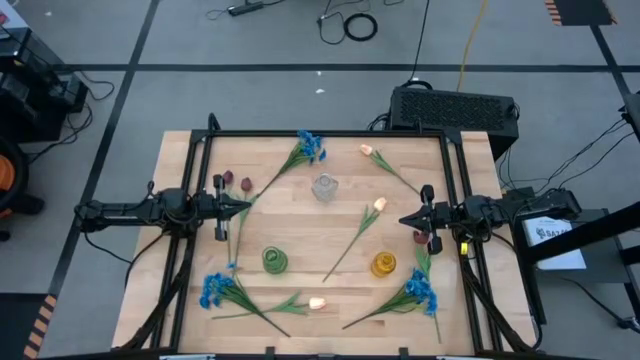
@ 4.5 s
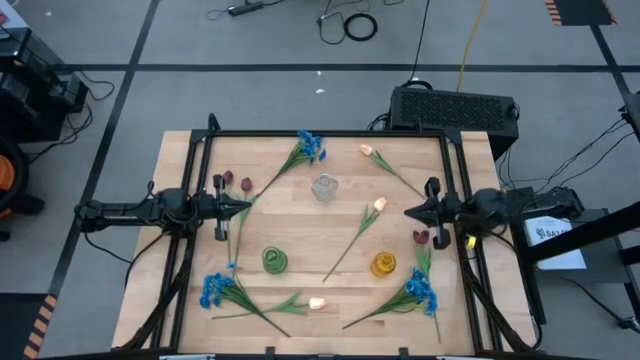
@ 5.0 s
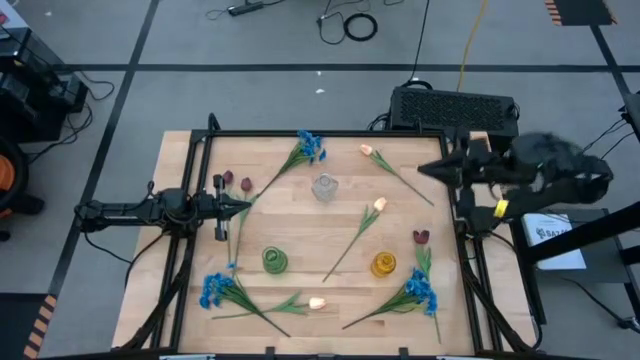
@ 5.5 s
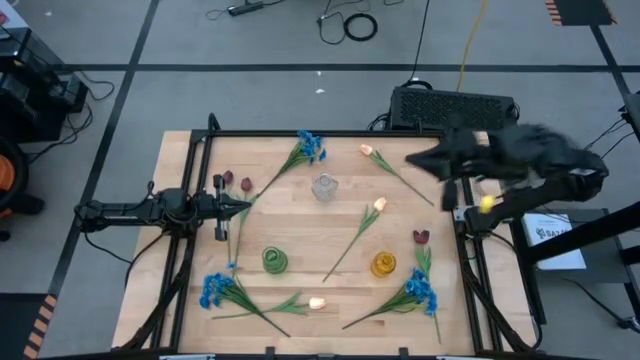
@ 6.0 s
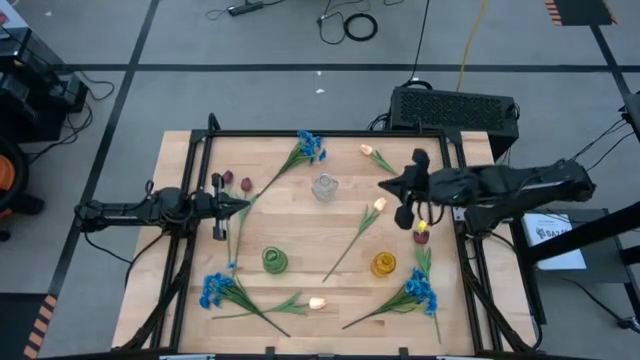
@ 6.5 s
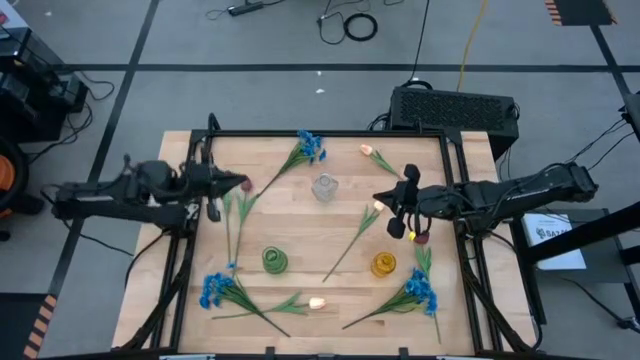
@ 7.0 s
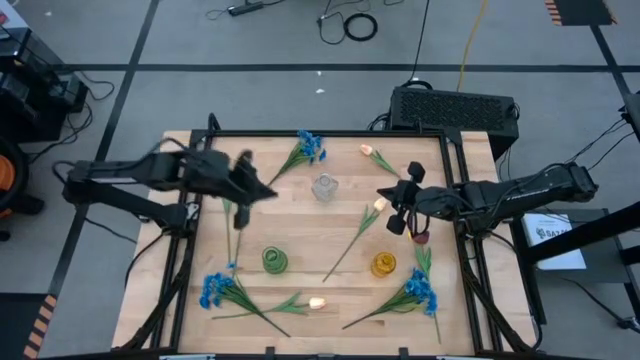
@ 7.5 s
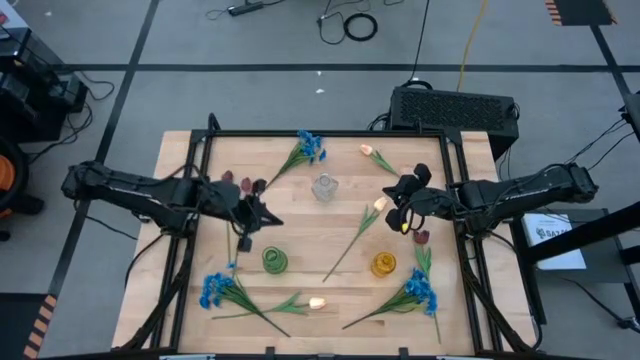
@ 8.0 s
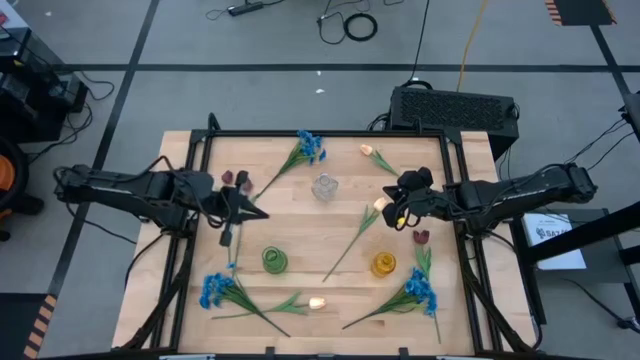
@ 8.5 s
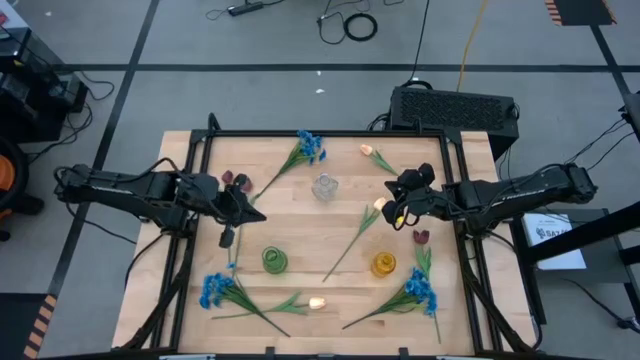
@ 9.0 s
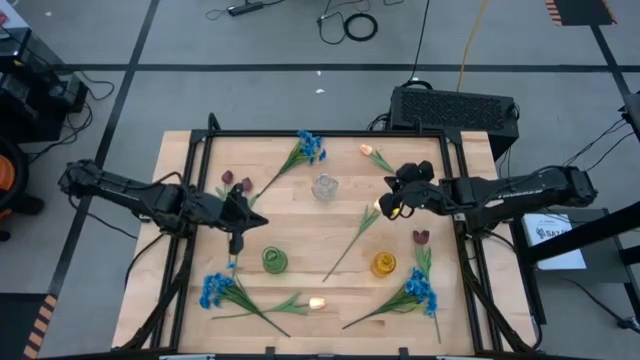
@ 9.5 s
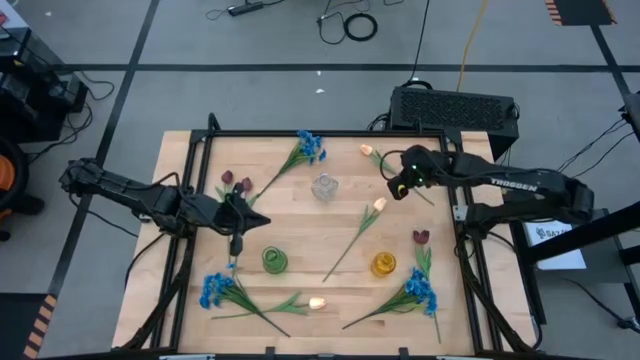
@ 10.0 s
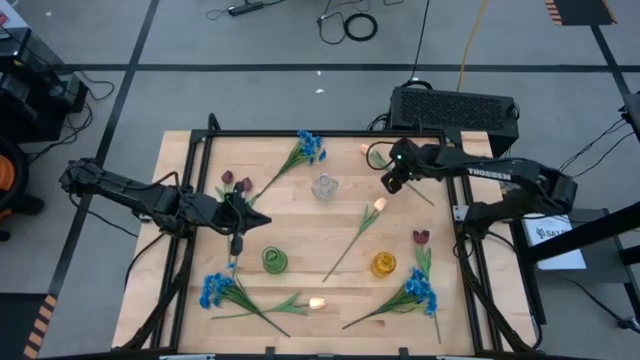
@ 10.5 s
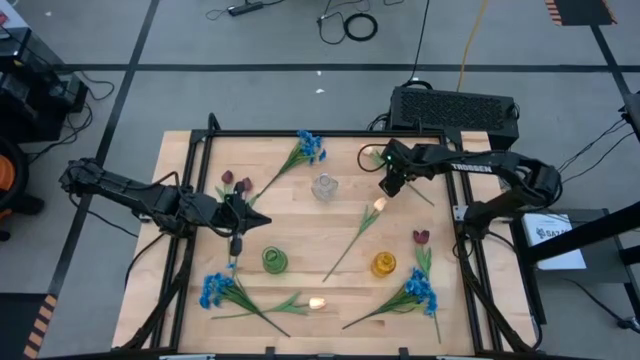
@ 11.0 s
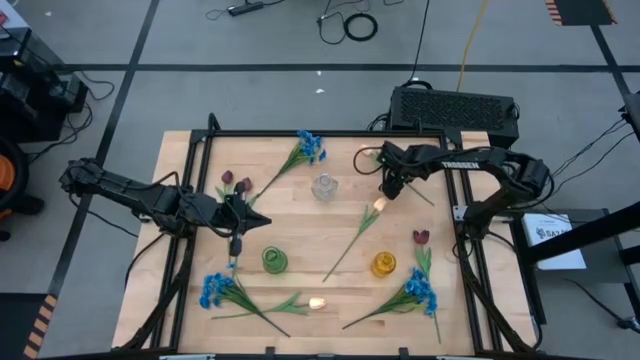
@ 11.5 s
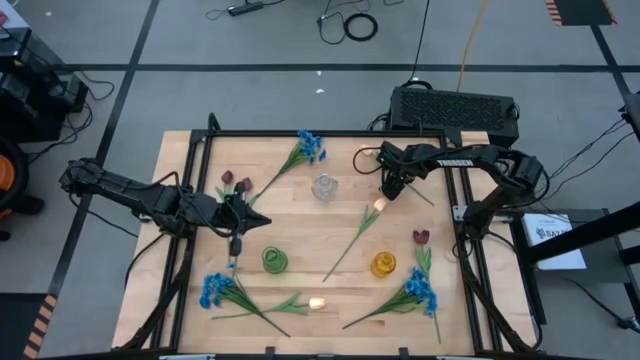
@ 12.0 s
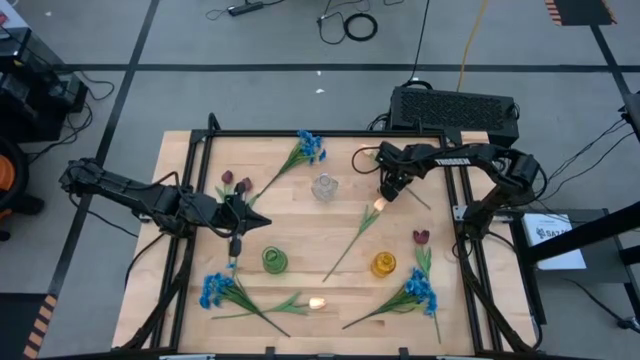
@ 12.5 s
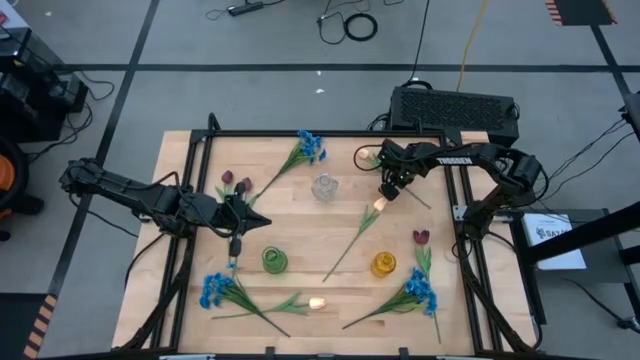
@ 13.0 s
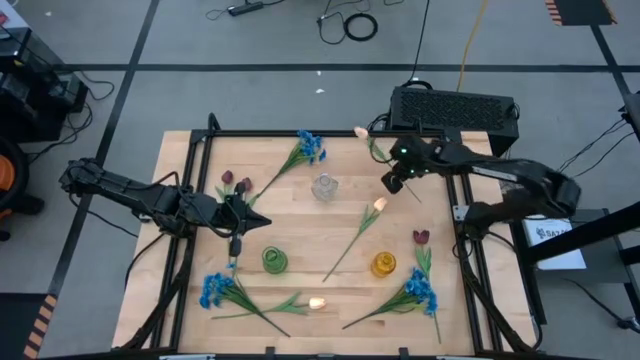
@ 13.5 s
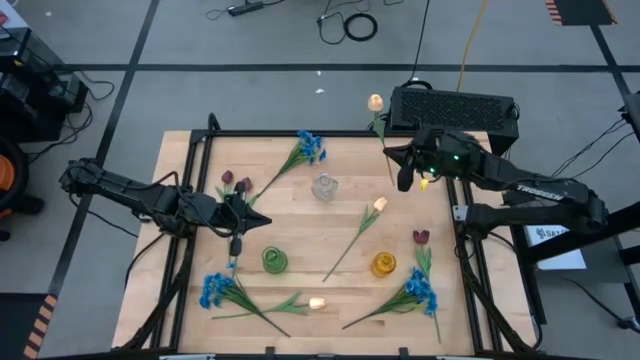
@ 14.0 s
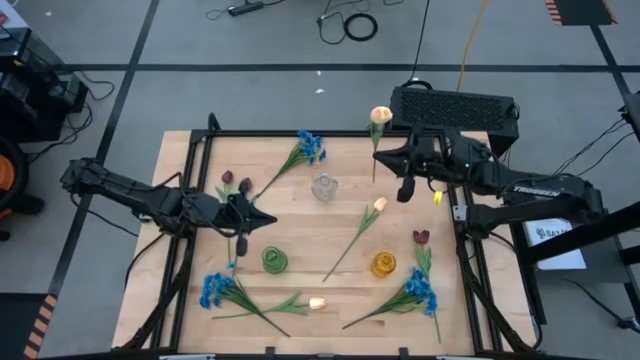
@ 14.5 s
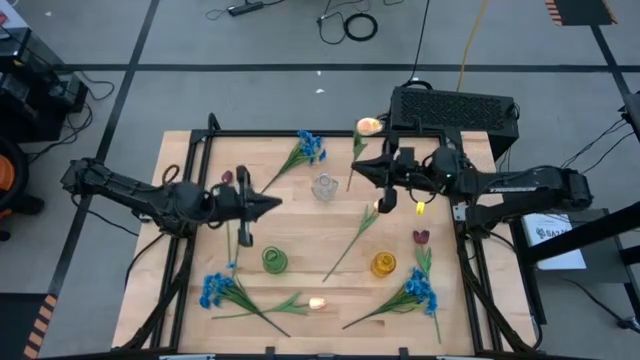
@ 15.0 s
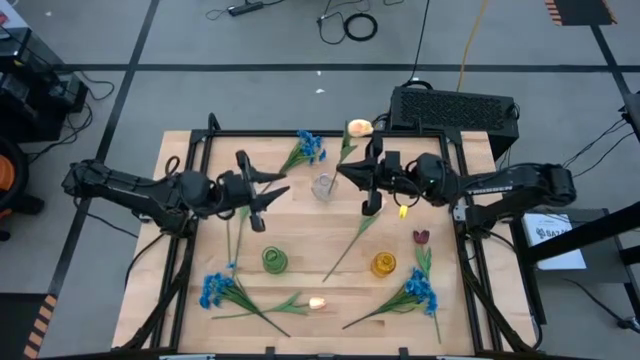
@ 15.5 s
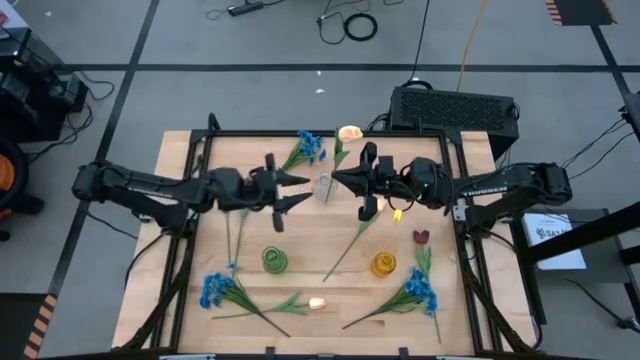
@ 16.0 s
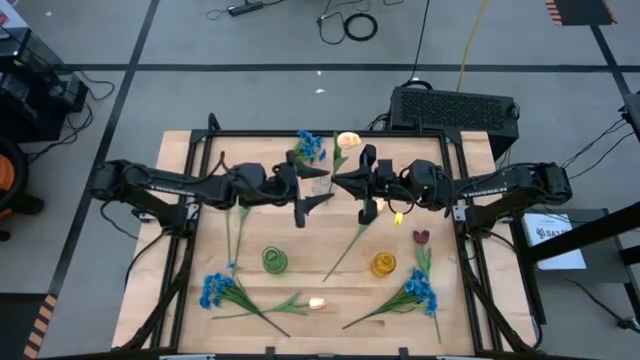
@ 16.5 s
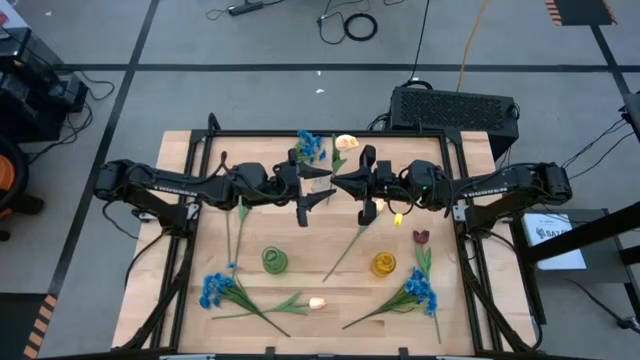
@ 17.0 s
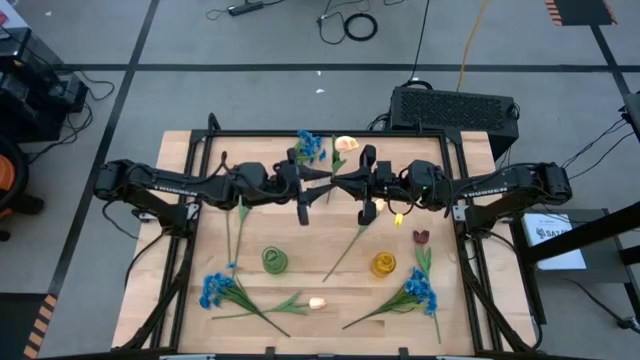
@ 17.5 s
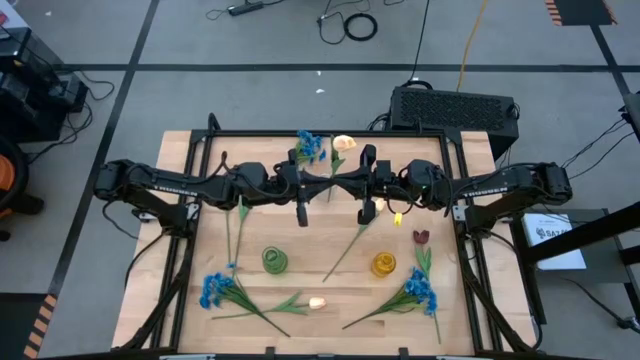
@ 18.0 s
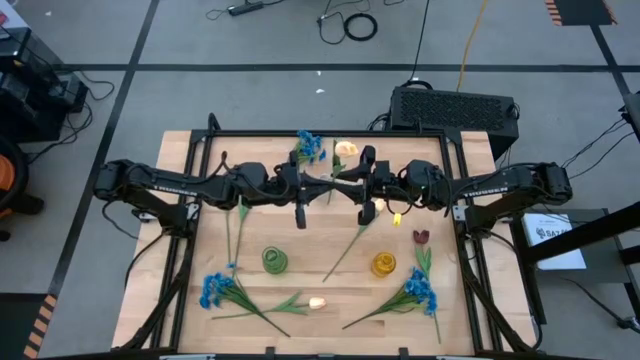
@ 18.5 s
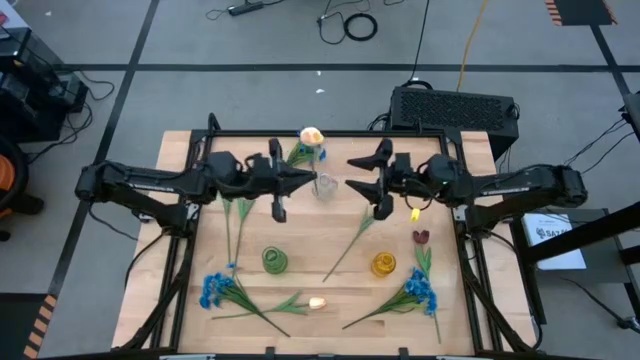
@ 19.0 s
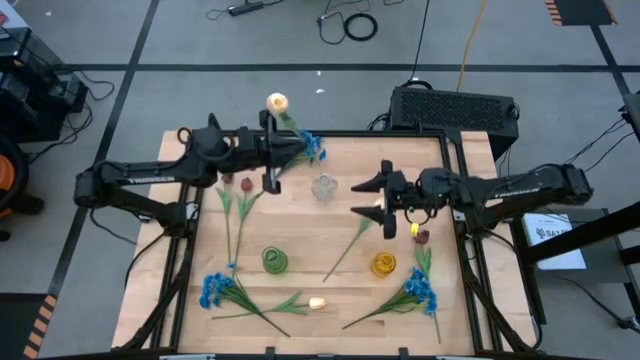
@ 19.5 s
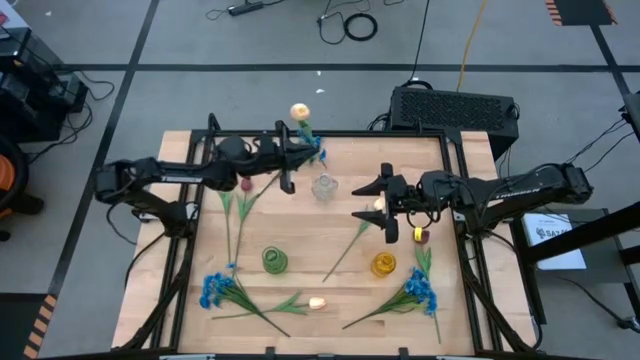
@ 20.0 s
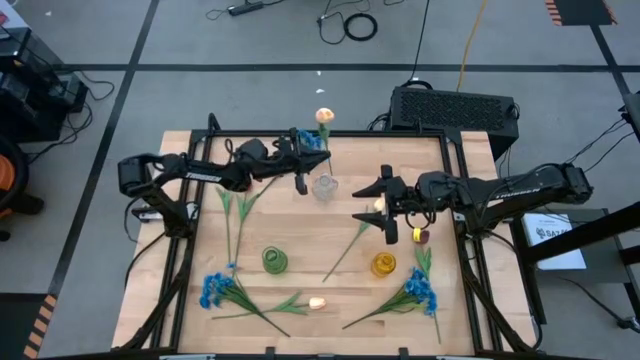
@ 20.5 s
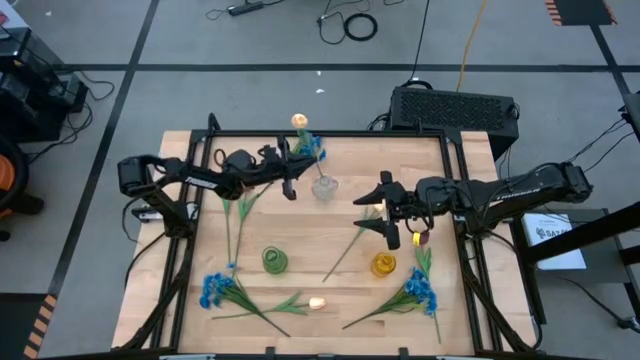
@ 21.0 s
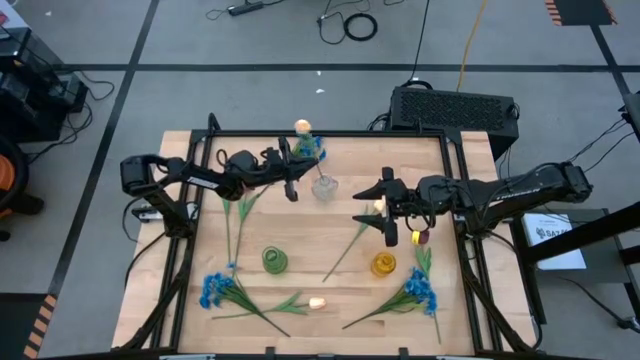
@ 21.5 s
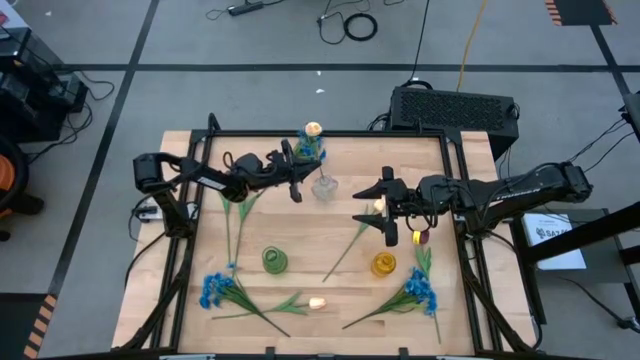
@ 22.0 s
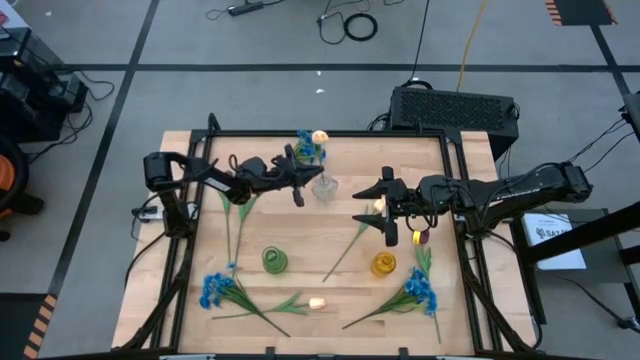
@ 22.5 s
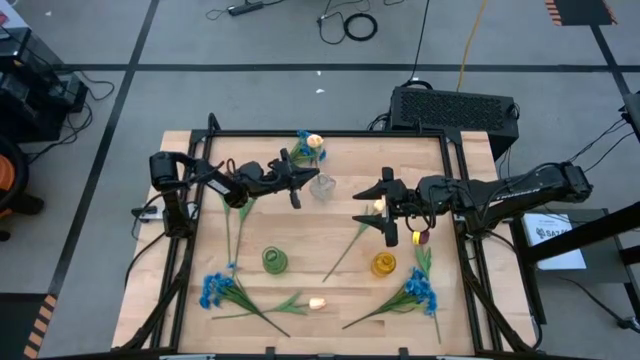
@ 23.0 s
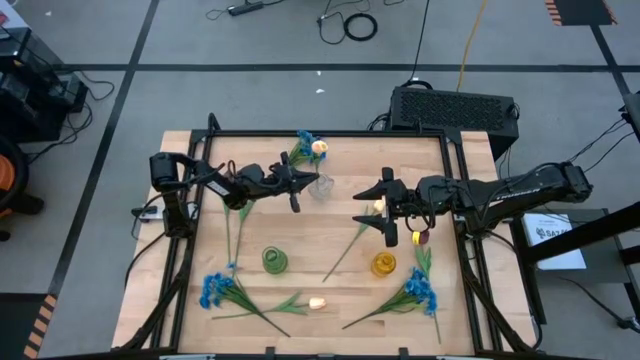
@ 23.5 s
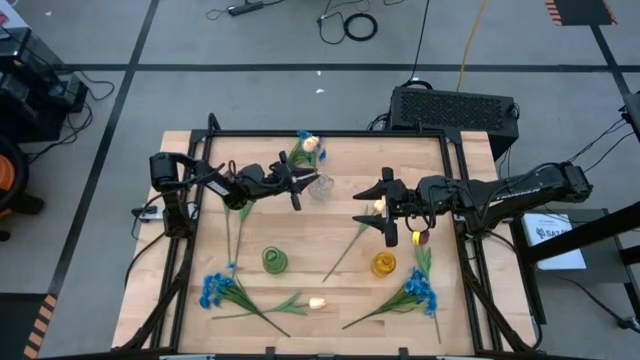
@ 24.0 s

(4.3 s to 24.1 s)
Task: Sort flowers into vase by color
Put the top pink flower into the transparent vase

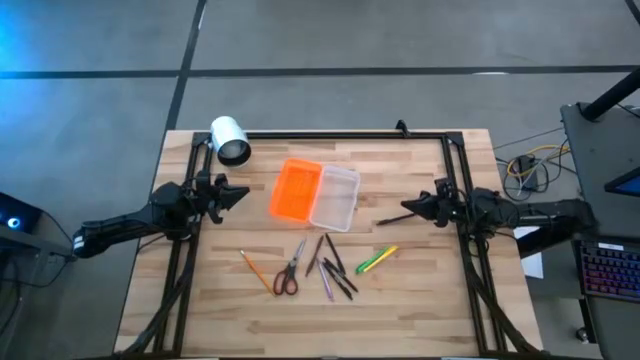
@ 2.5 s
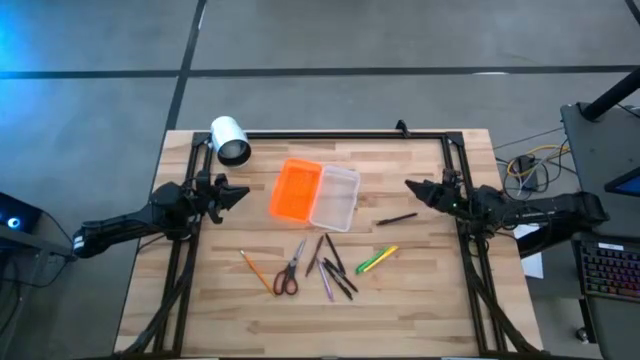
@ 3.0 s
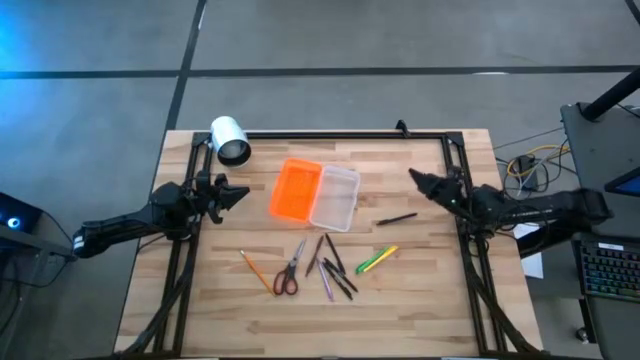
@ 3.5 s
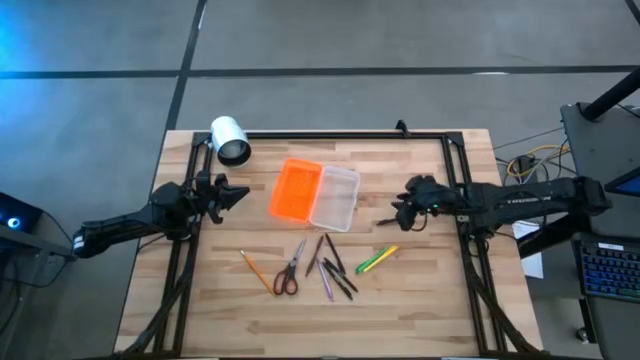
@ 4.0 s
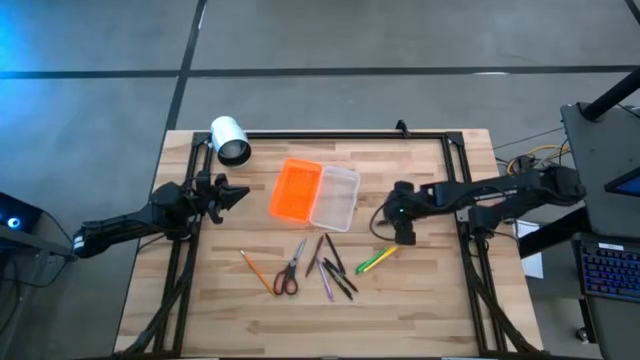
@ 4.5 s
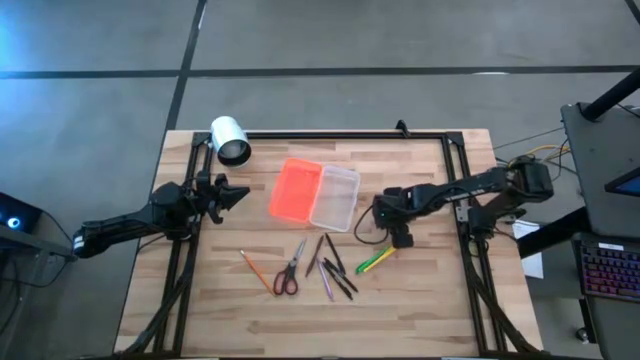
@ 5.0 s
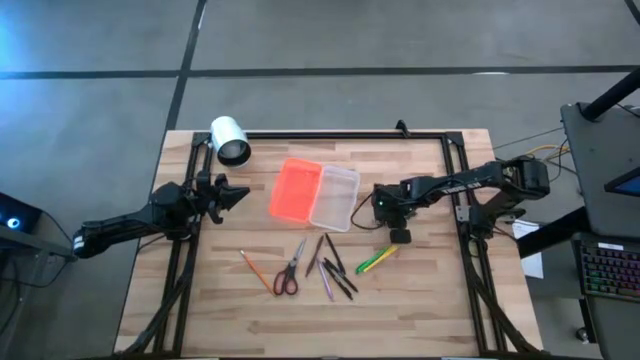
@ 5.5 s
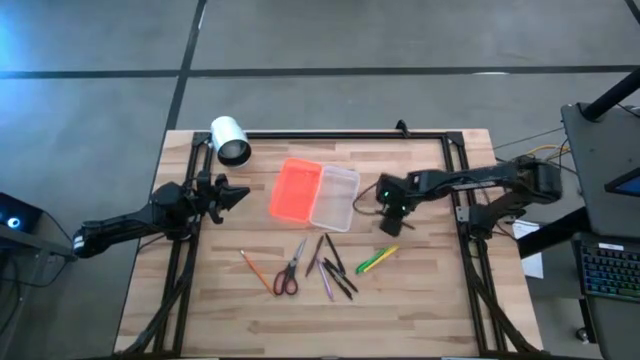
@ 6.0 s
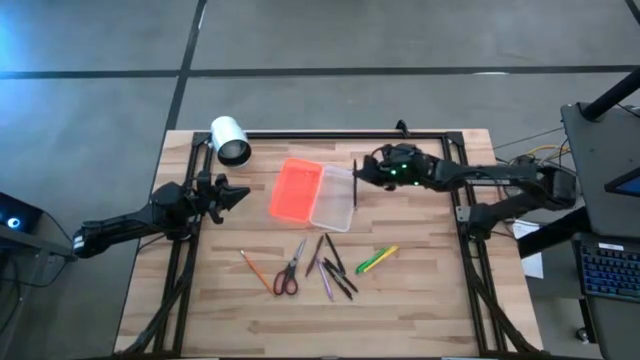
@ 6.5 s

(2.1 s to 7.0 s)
Task: Pick & place school supplies into a supply box
Put the black pen into the orange supply box
